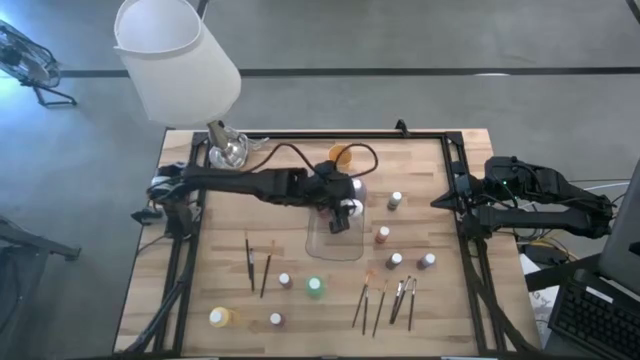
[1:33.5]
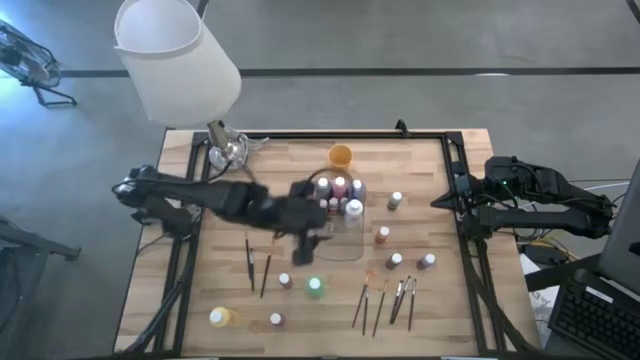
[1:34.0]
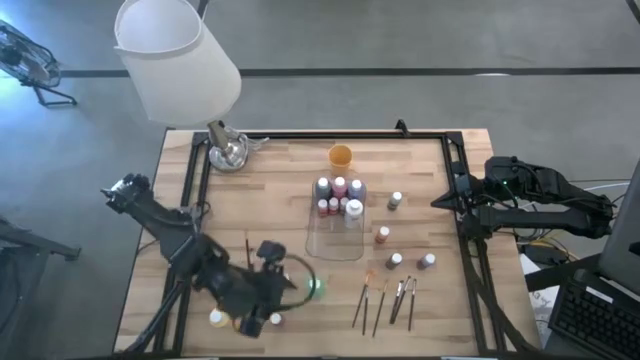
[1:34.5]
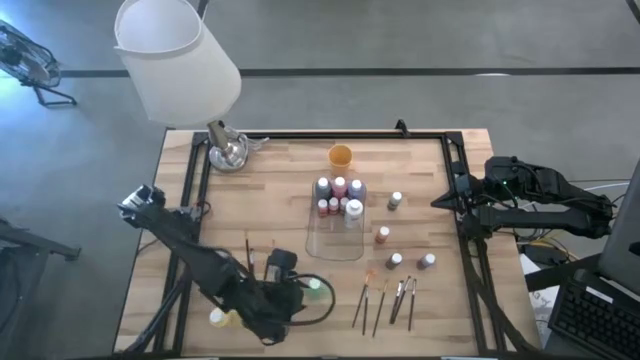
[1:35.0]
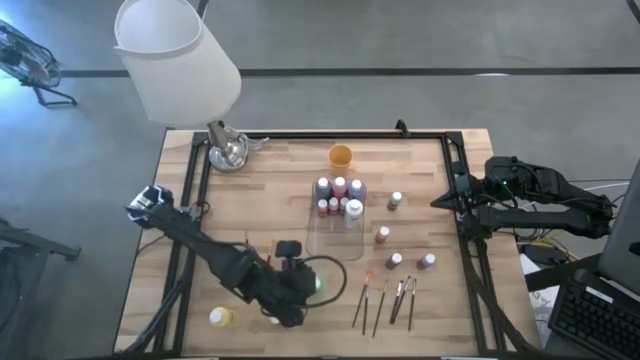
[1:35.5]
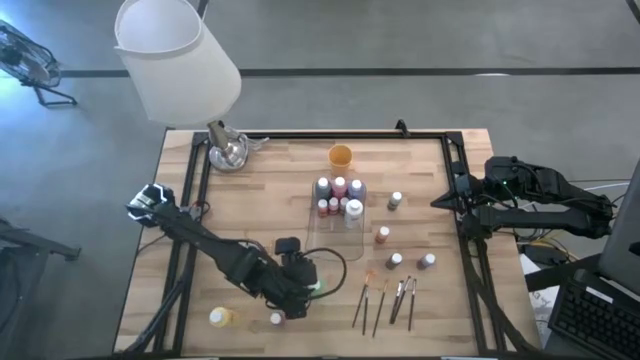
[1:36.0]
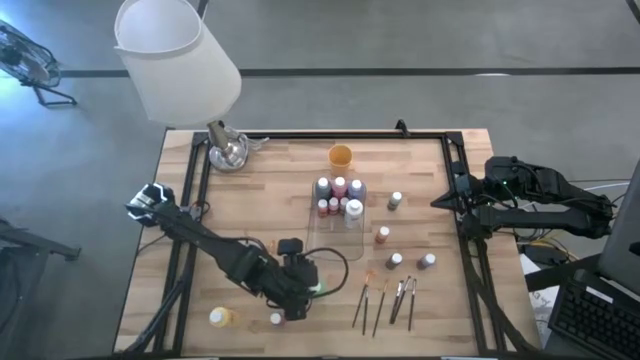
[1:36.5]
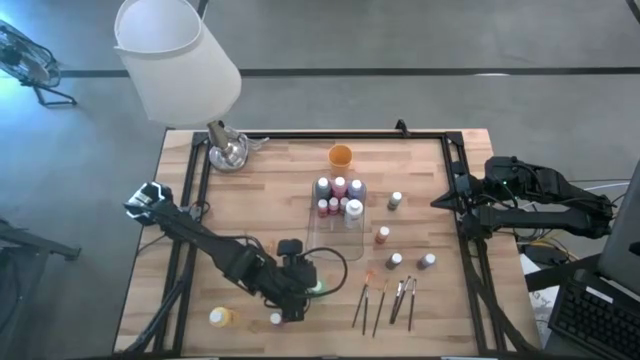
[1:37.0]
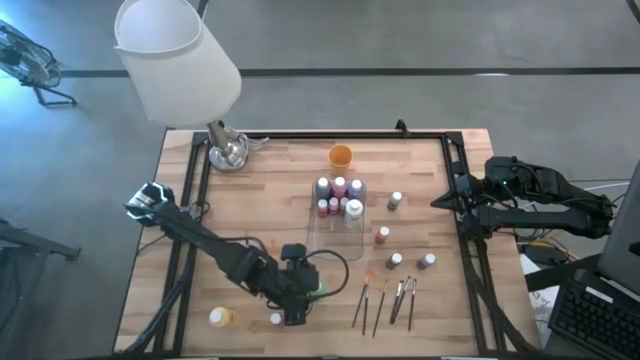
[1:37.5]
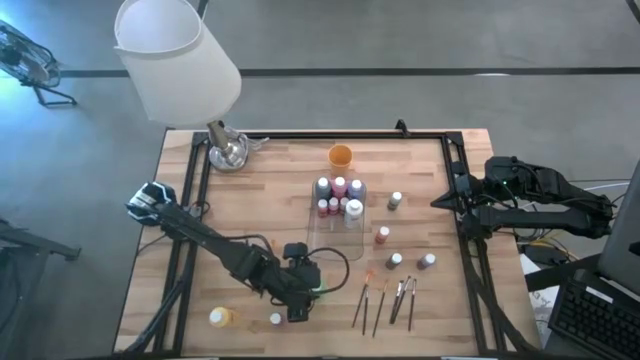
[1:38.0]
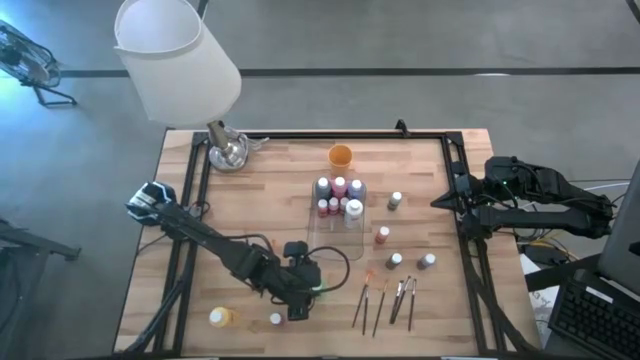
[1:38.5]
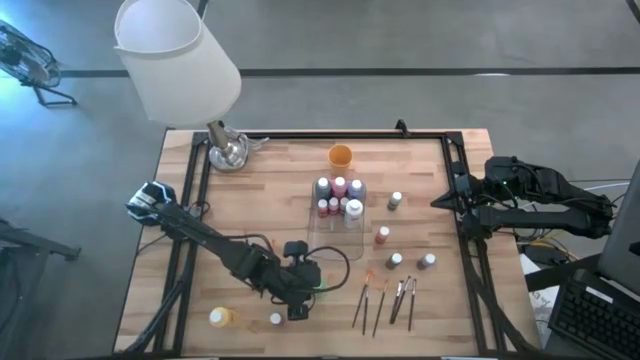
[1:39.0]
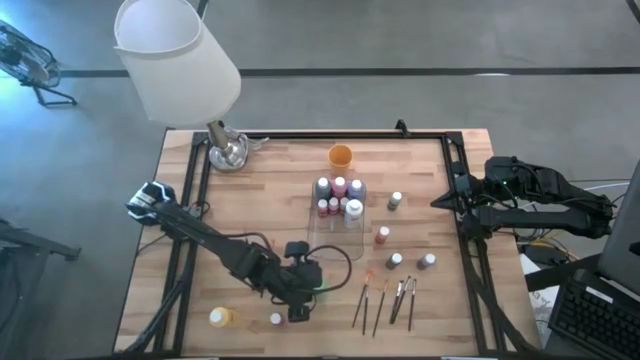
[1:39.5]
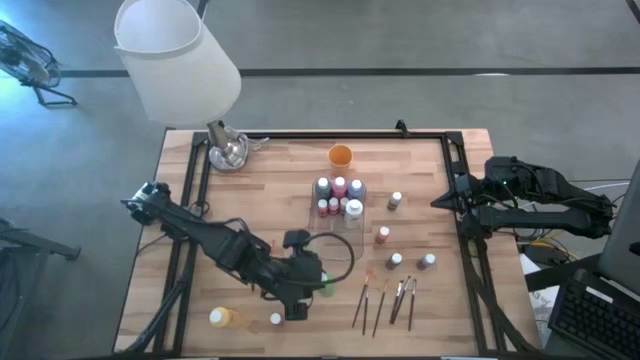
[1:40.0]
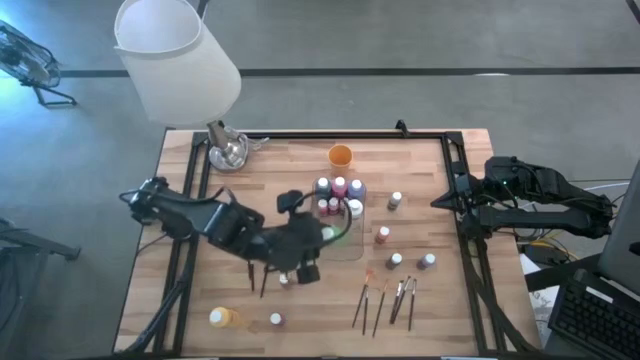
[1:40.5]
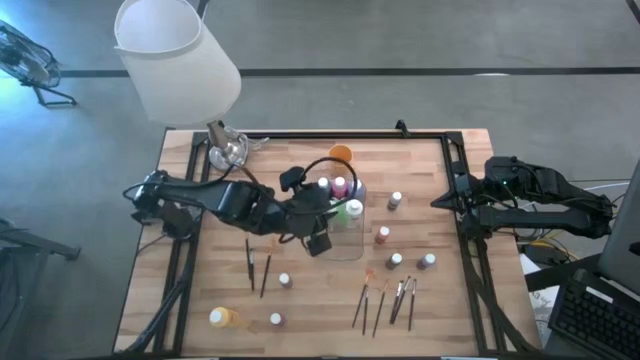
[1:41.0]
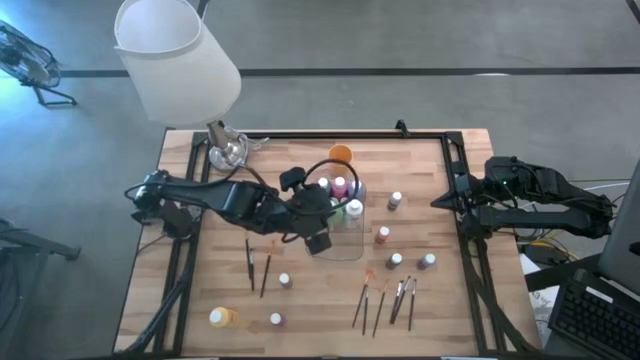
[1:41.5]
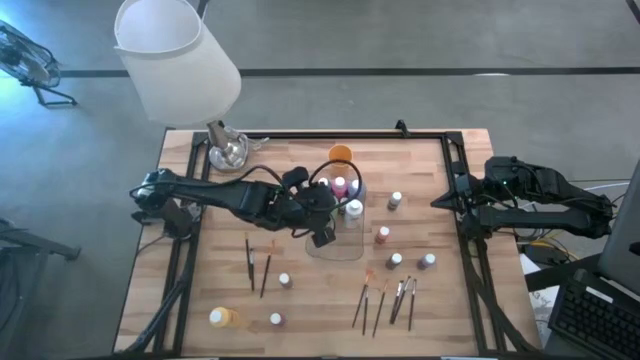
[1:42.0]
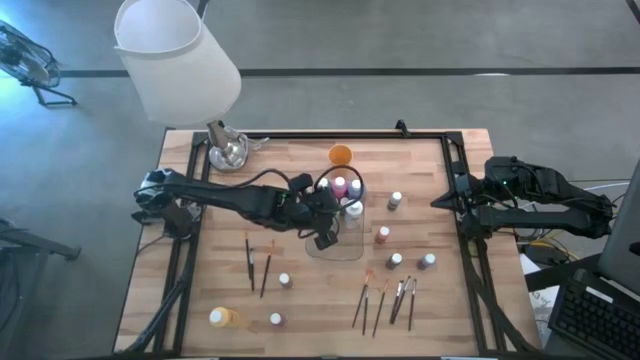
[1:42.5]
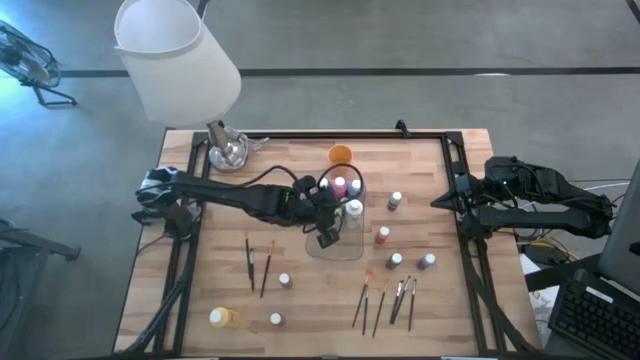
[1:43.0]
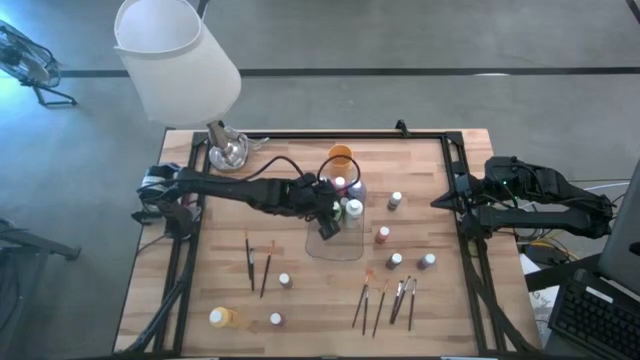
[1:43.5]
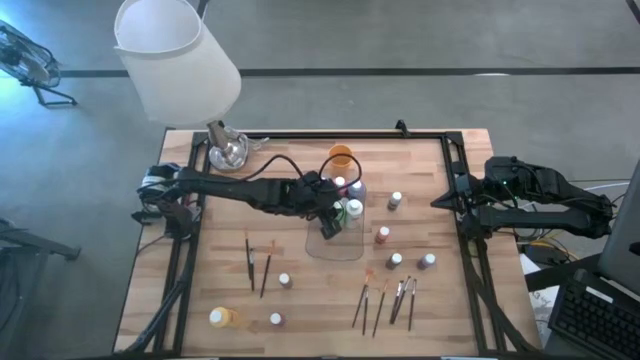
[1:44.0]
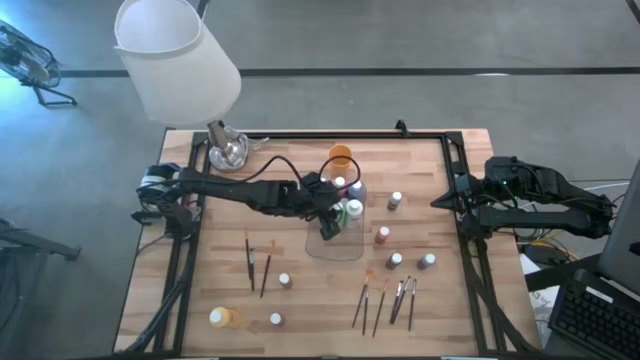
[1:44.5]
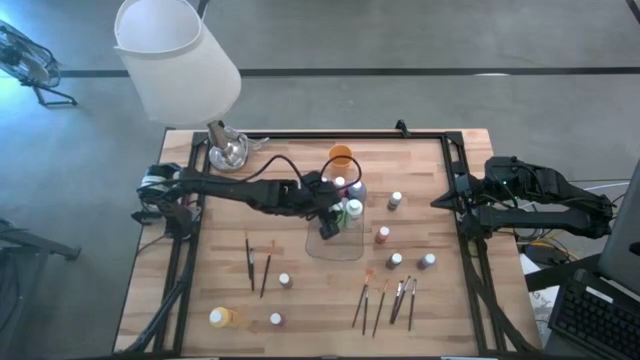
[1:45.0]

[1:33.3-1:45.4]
Task: Pick & Place Paint Supplies
Put the green paint bottle into the transparent bin

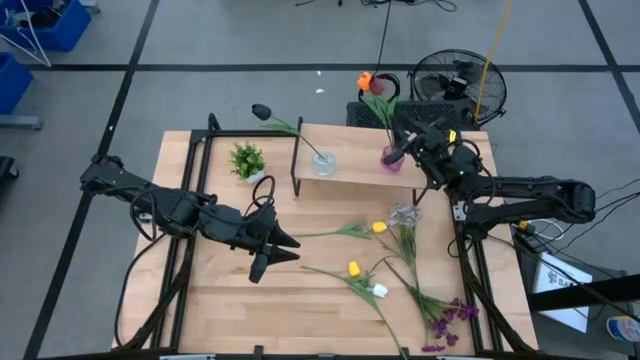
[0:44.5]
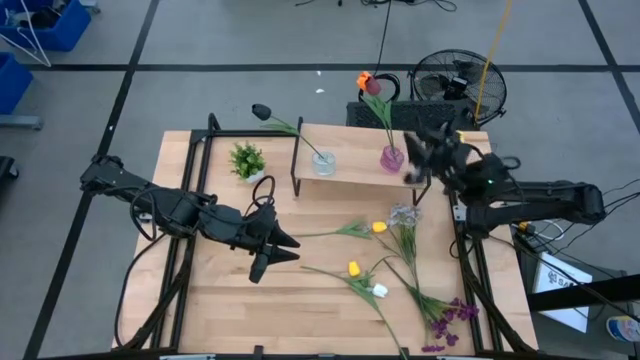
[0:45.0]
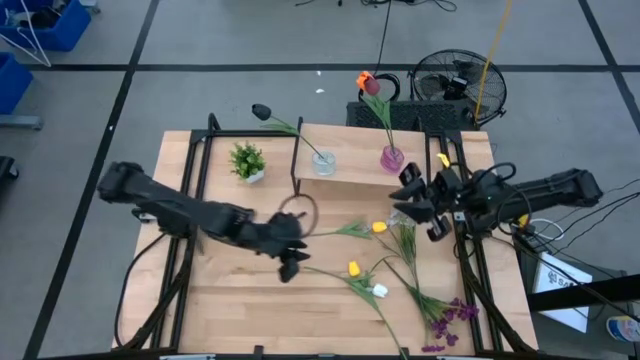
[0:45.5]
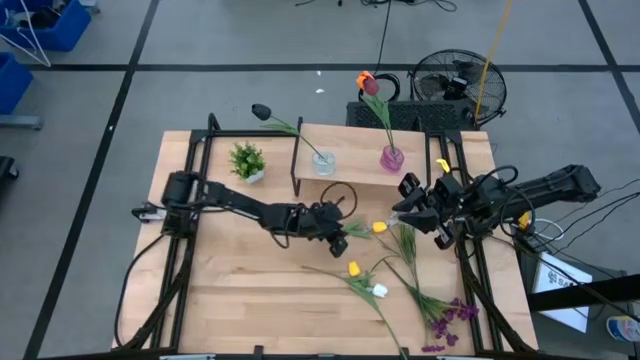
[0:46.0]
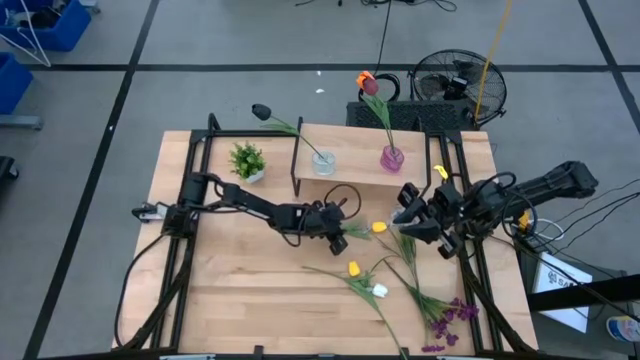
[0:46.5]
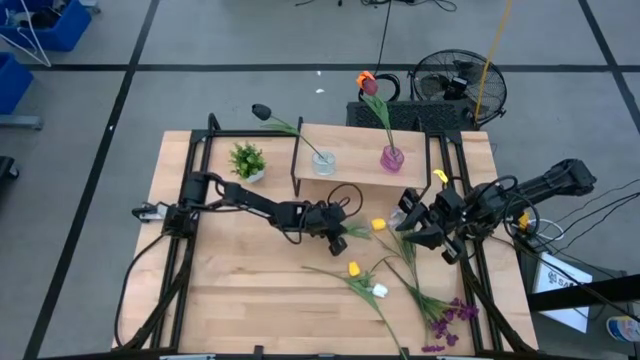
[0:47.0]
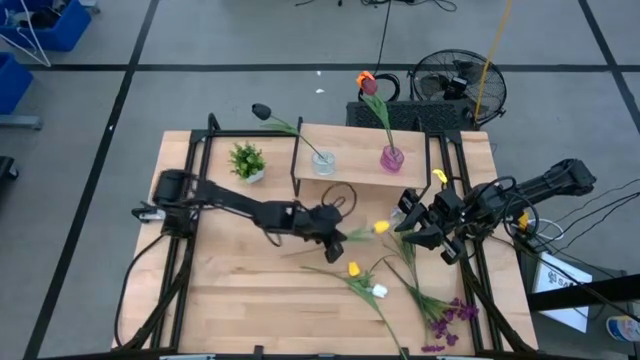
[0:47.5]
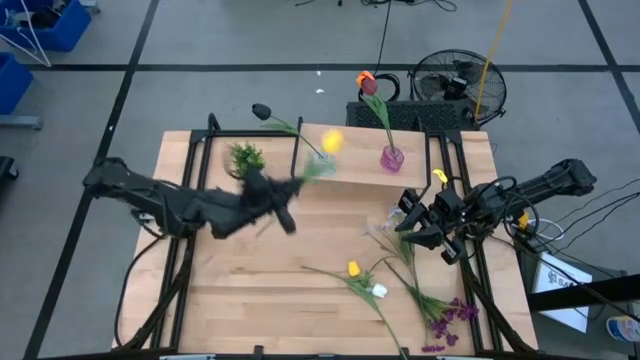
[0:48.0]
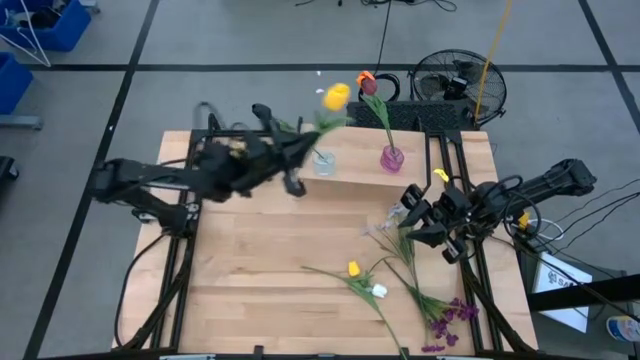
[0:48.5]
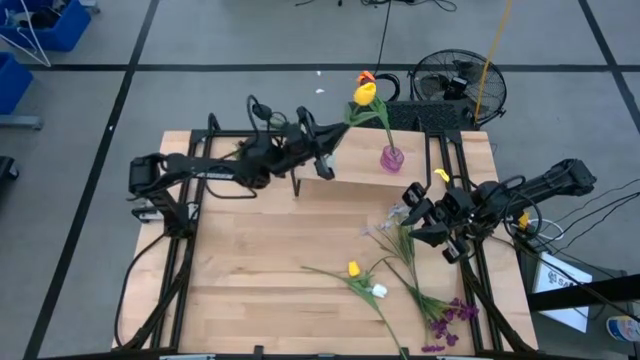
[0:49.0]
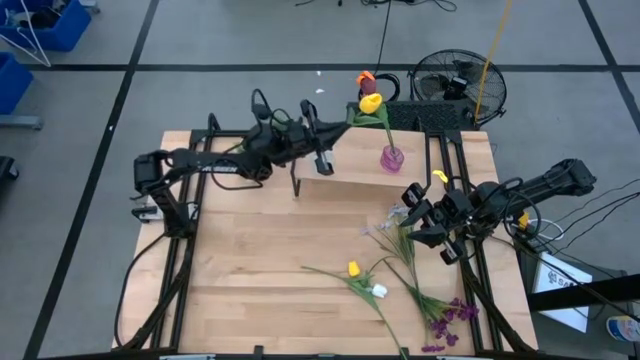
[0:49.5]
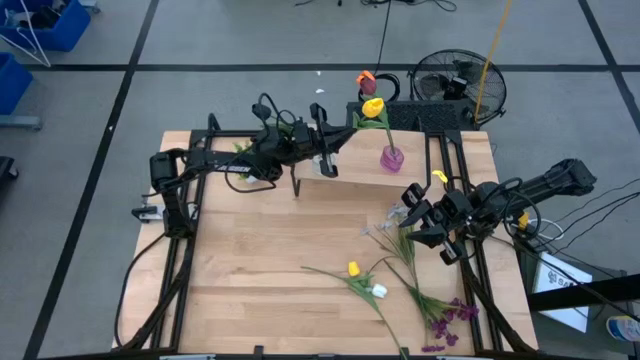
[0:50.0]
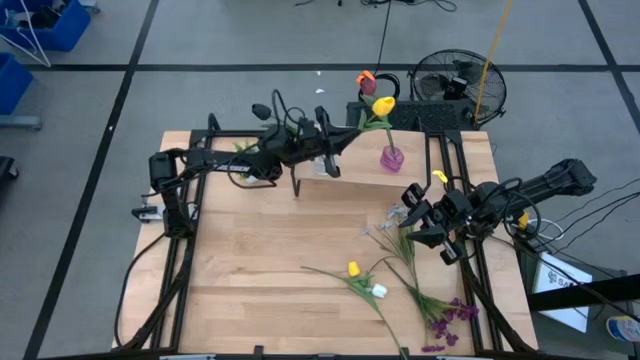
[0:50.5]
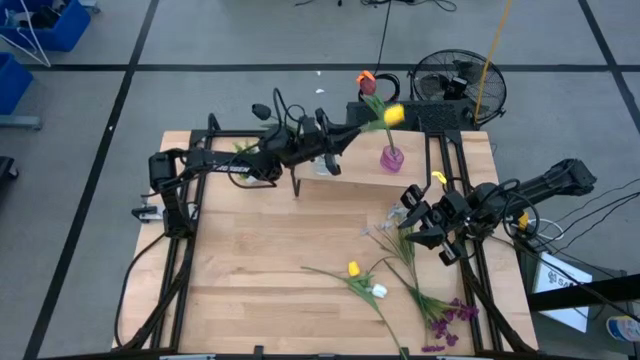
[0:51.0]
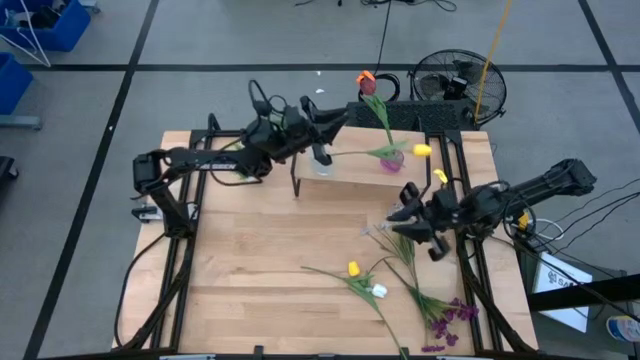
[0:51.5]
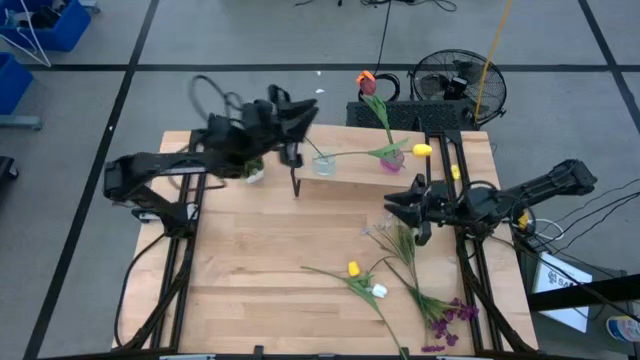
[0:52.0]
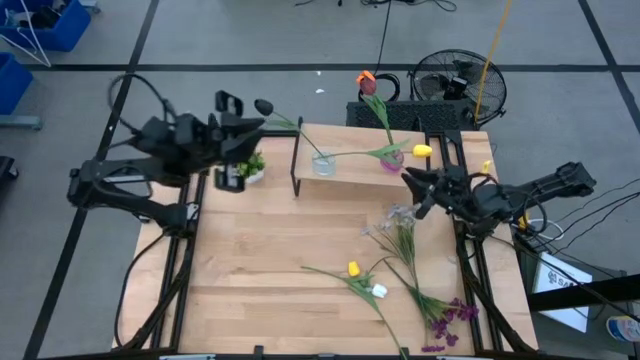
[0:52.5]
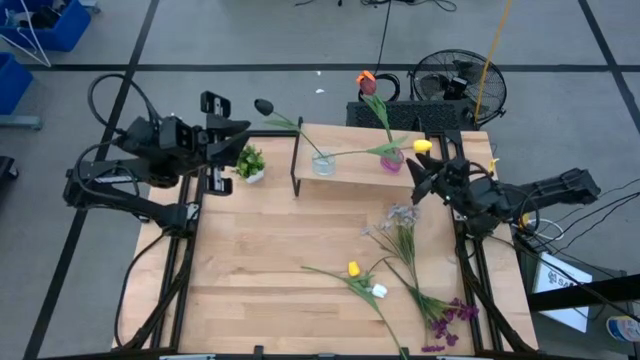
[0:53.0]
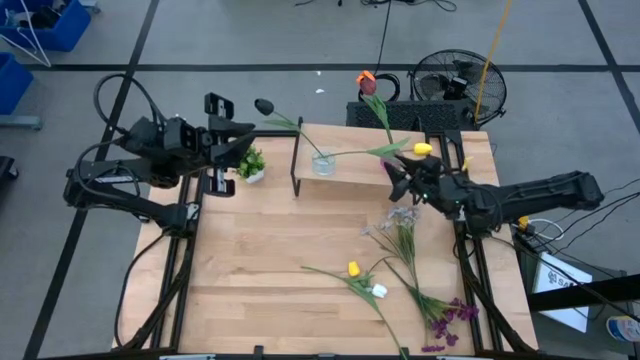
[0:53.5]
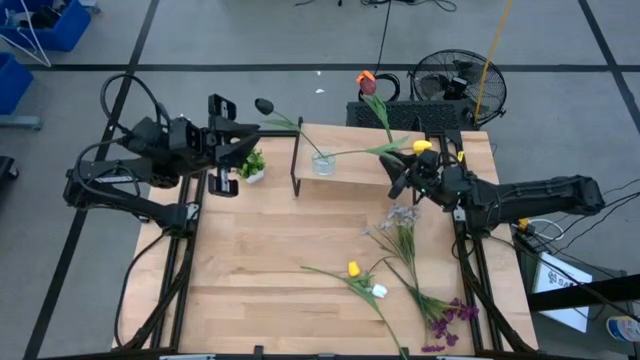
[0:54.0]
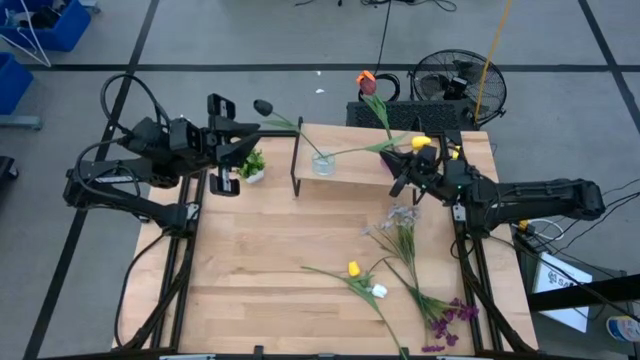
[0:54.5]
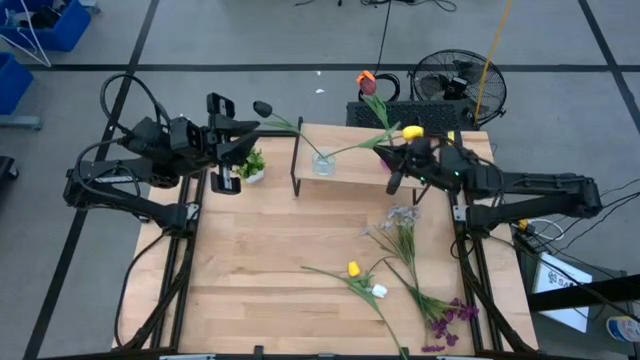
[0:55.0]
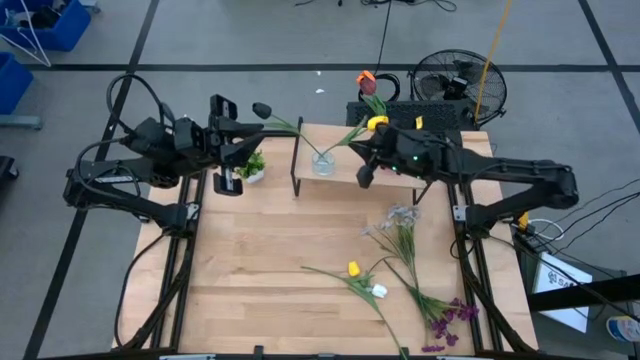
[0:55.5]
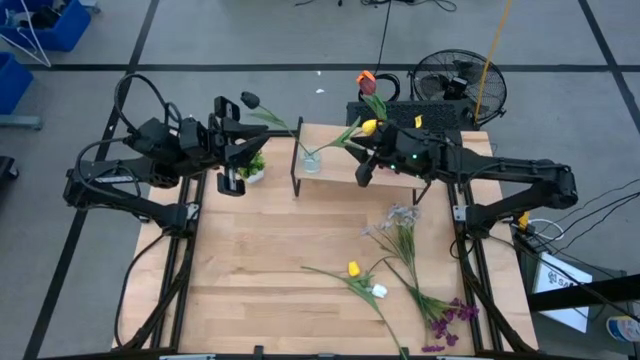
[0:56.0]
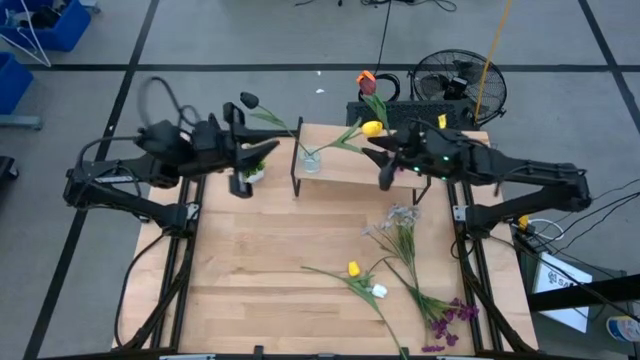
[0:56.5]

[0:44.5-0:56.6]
Task: Pick and place flowers into a vace then onto a shelf
Put the yellow tulip into the transparent vase
